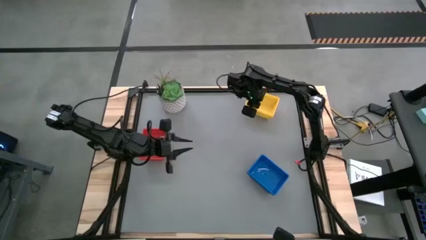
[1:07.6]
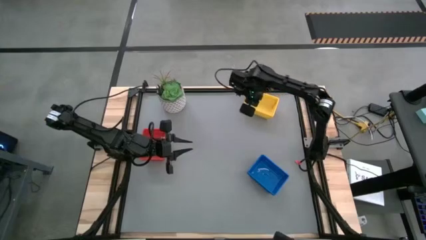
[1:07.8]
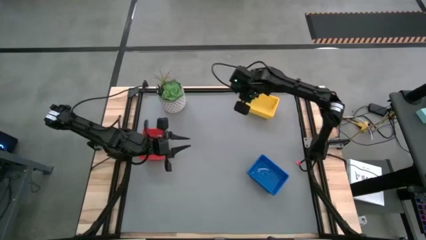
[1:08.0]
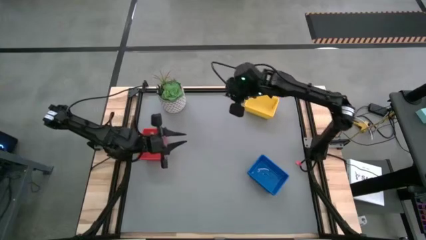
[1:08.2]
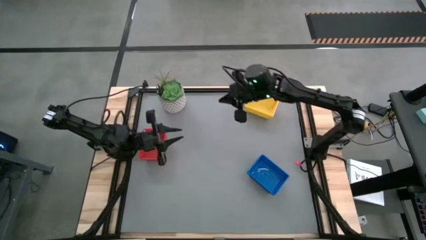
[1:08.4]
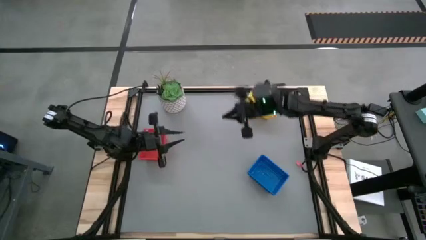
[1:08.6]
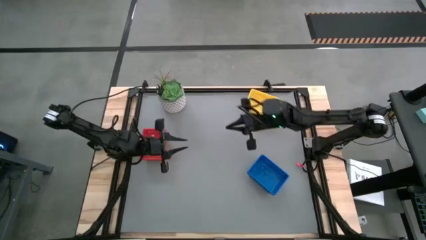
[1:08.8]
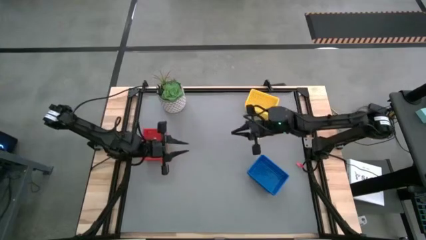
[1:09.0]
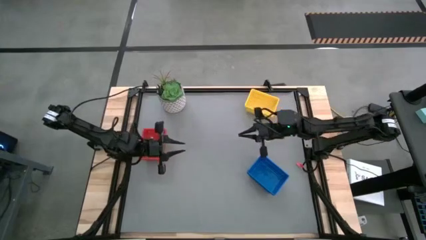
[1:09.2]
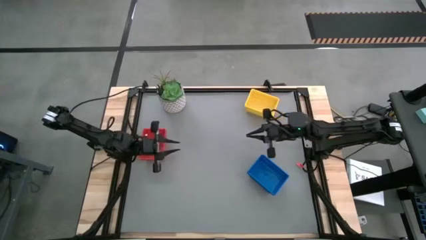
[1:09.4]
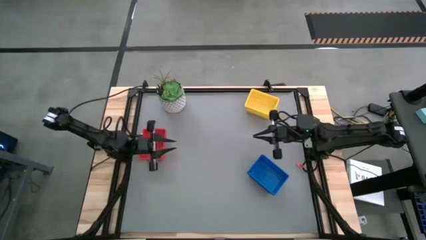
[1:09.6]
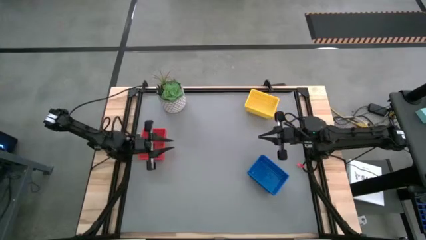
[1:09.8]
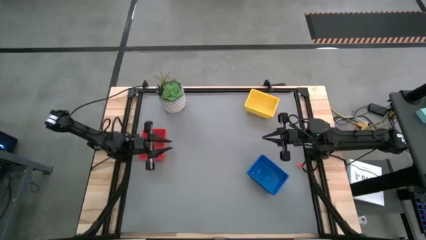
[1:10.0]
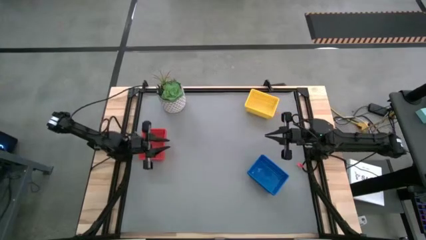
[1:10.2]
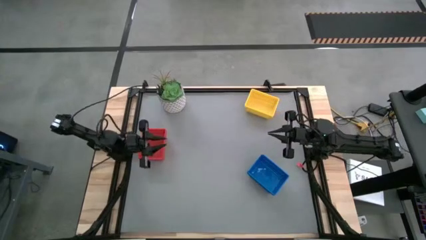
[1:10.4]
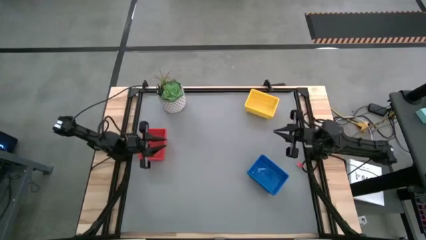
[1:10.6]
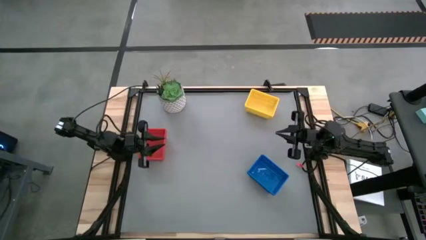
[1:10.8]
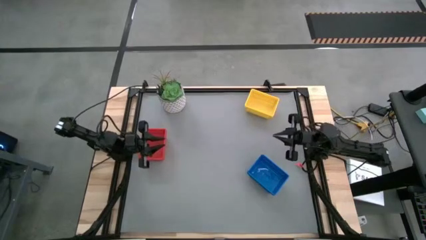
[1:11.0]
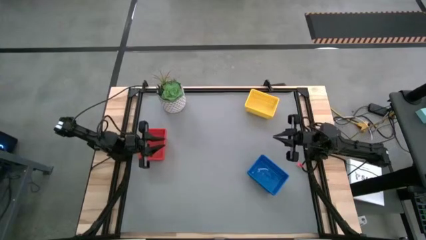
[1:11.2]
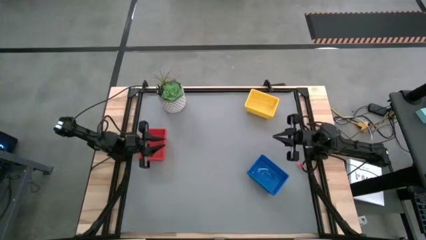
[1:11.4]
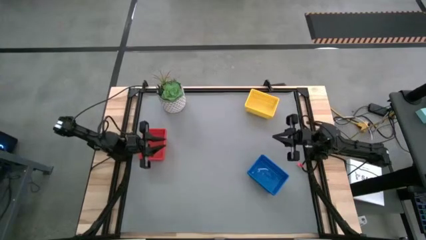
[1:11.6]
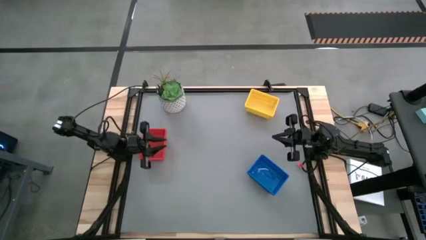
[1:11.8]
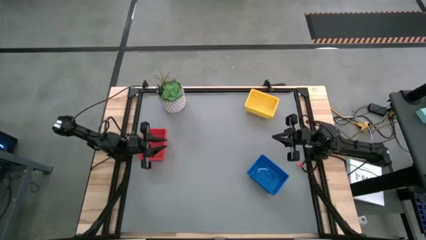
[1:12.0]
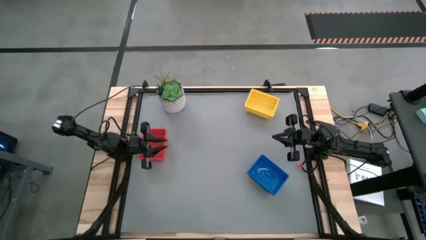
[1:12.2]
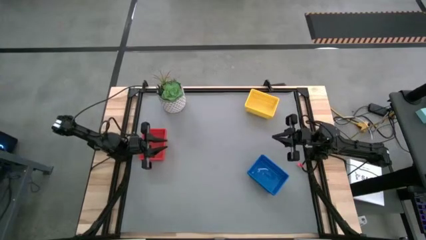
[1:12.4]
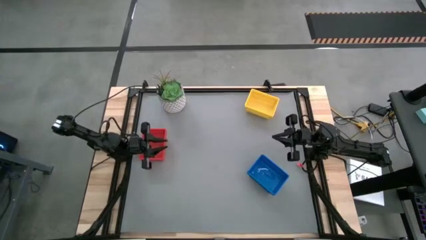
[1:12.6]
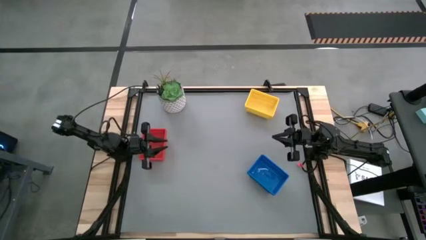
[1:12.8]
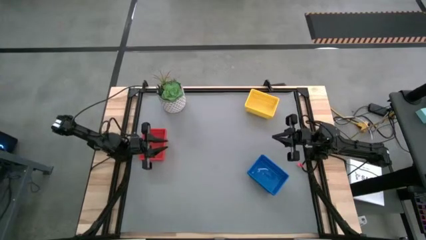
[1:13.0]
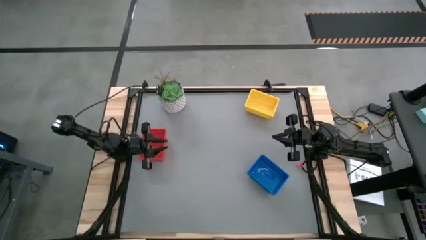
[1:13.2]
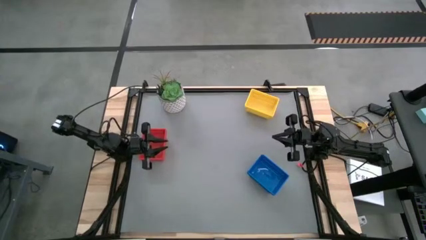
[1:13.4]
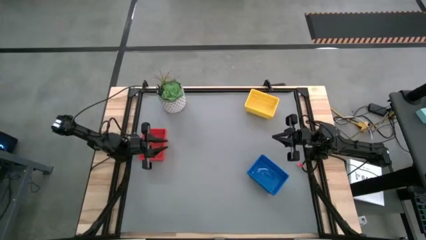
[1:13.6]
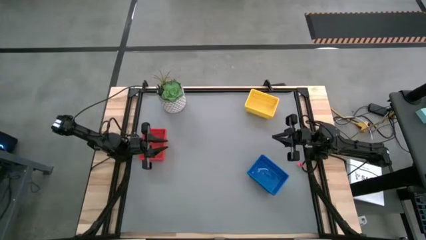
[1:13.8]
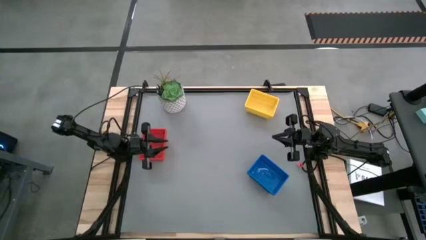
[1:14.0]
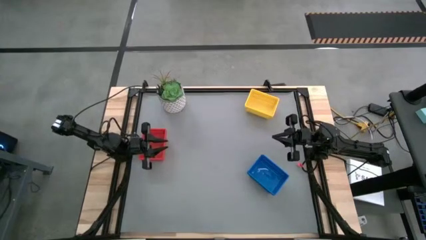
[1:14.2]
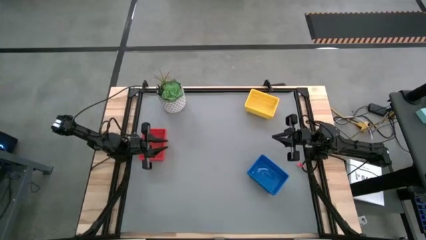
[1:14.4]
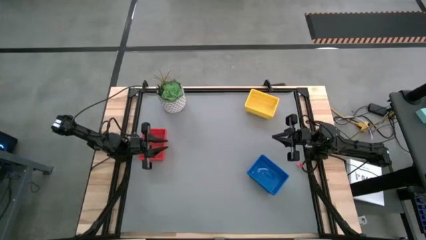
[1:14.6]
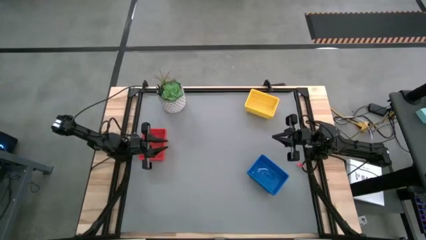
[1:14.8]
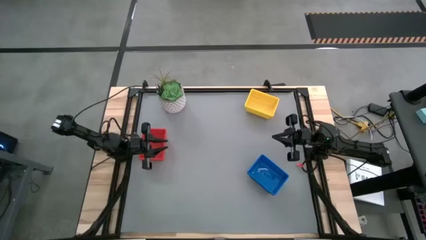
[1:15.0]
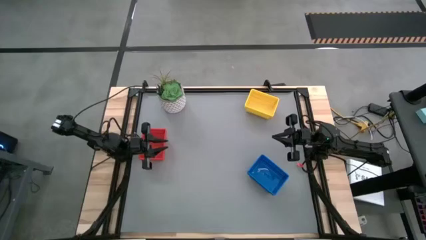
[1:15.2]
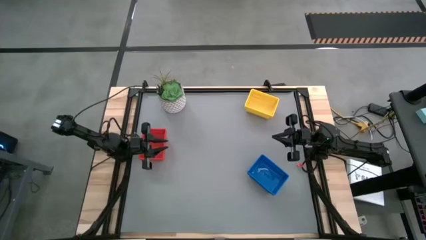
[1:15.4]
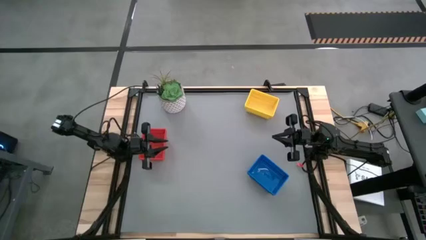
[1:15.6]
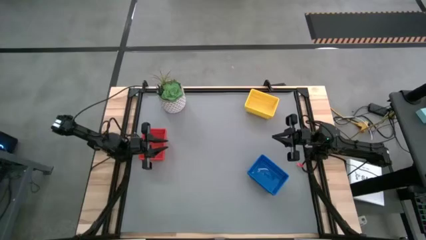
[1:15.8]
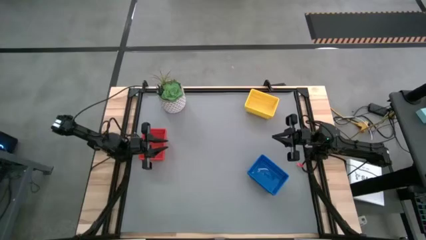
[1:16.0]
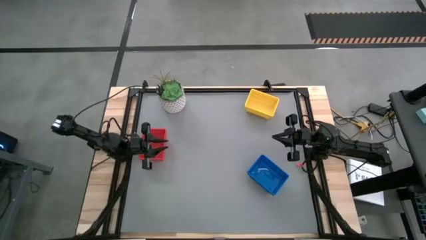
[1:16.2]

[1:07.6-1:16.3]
Return to Home Position

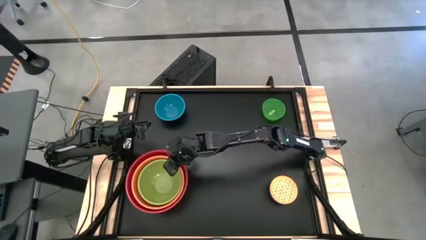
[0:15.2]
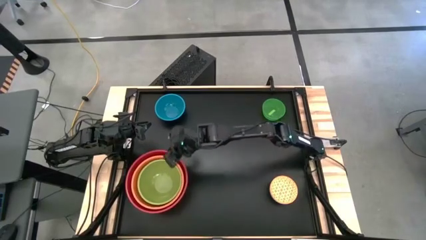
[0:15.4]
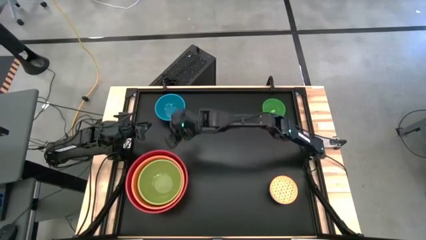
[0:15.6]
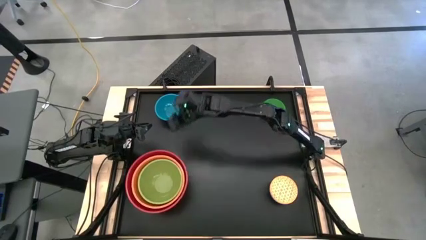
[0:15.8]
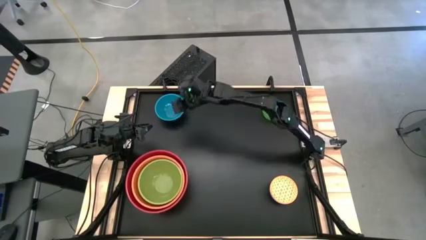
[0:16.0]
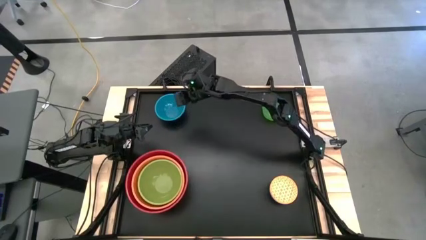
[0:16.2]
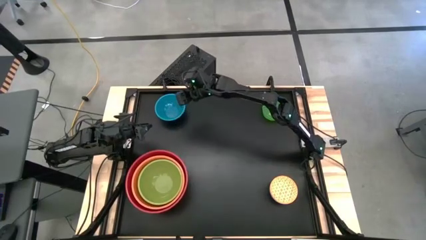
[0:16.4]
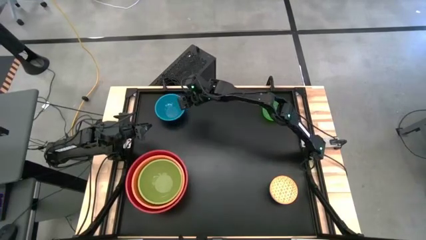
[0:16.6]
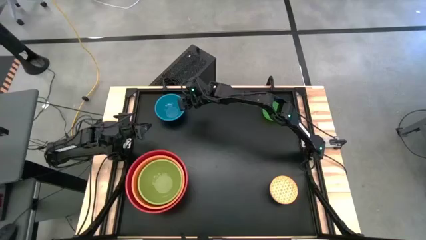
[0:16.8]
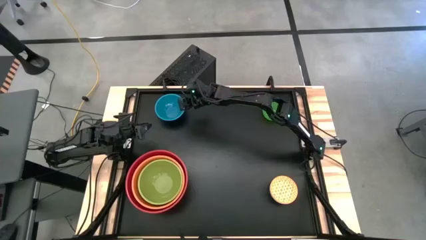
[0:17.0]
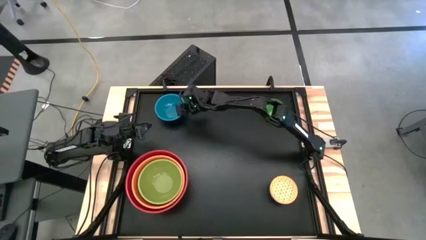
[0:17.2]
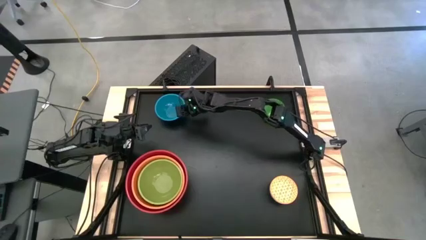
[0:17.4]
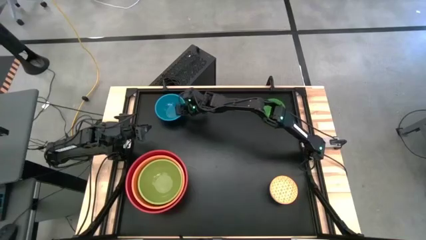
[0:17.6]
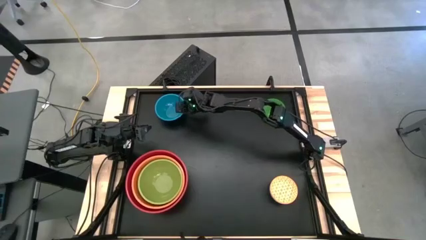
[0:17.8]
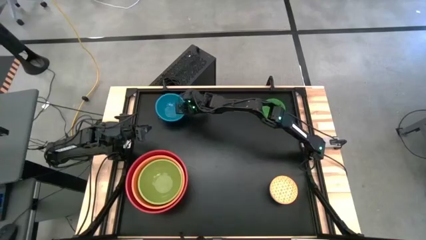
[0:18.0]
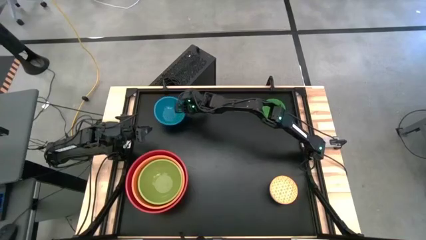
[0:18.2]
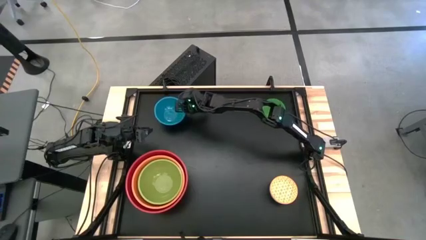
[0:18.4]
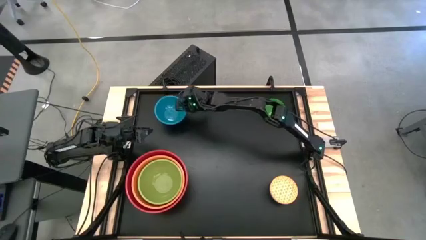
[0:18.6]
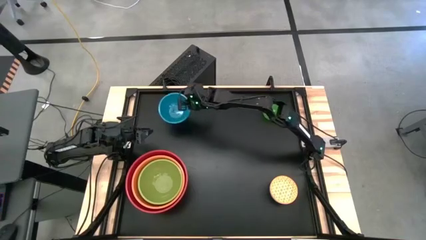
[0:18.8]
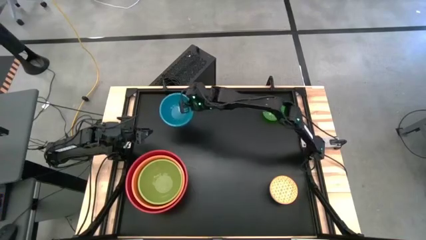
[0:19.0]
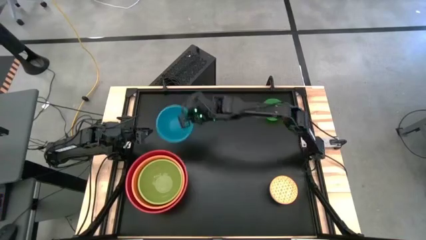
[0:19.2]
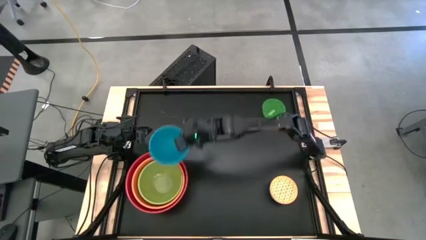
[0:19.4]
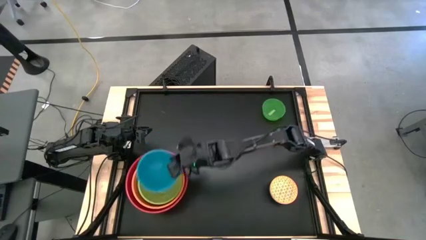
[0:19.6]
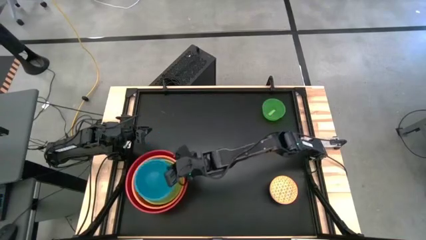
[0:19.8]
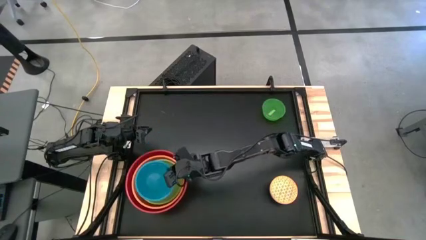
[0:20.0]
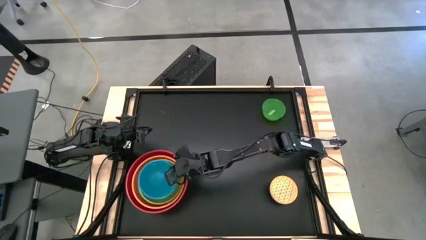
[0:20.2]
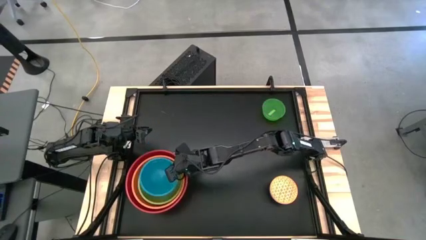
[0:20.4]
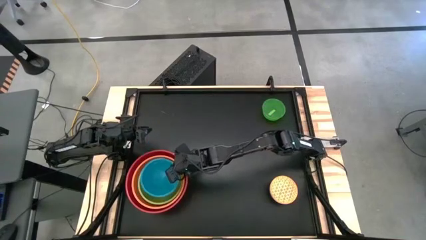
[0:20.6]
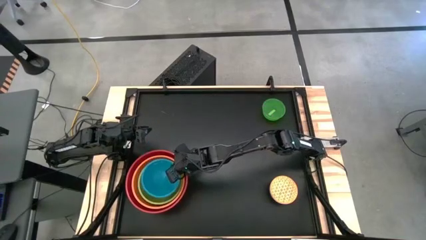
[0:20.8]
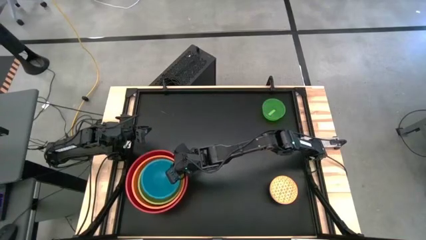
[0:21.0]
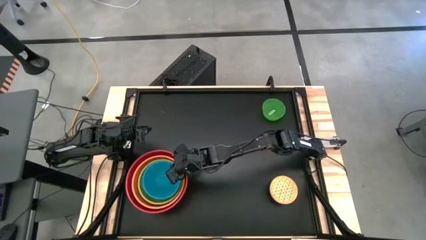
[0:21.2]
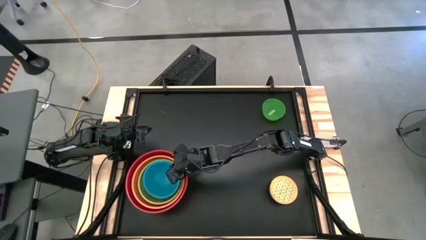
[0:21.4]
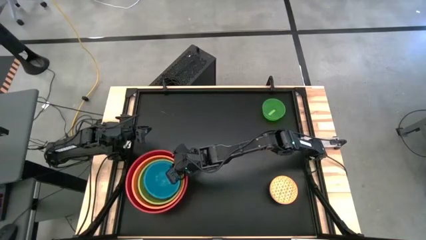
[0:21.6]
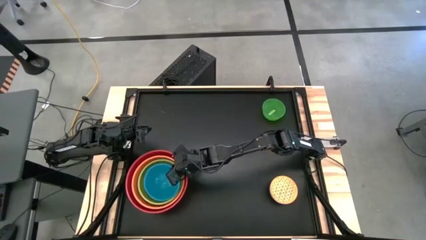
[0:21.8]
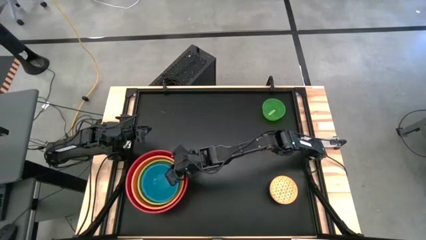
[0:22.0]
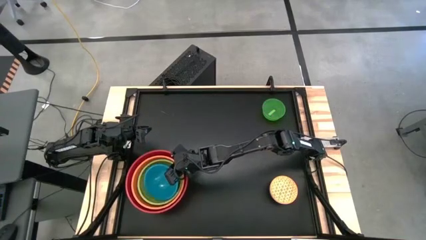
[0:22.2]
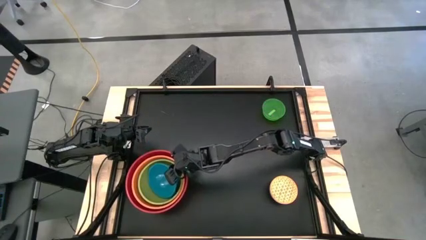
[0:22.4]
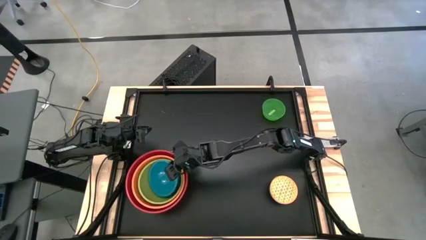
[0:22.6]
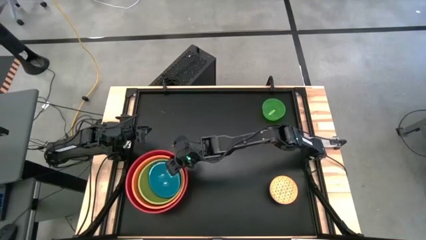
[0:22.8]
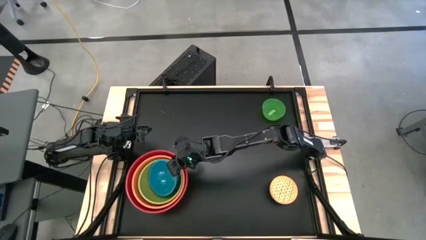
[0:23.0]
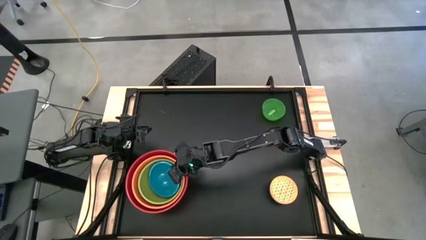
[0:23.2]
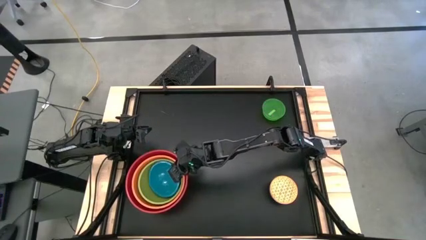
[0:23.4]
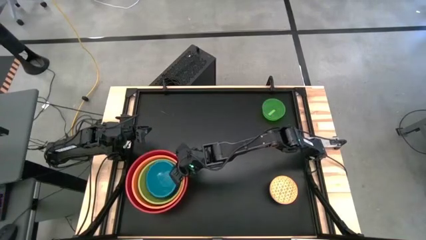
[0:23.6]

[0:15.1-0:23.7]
Stack the blue bowl on top of the light green bowl
